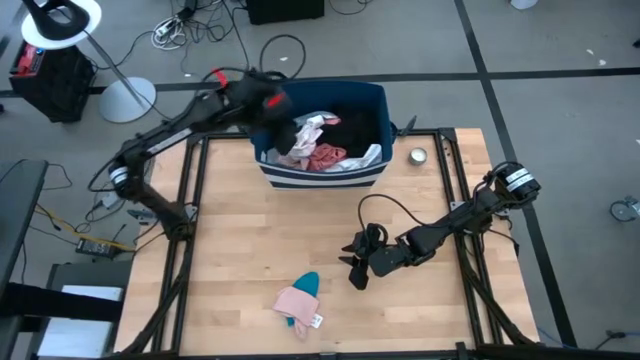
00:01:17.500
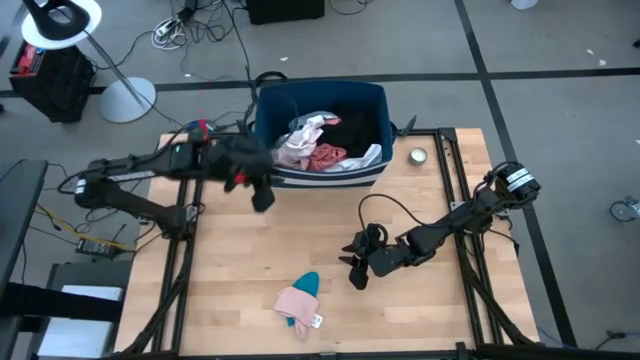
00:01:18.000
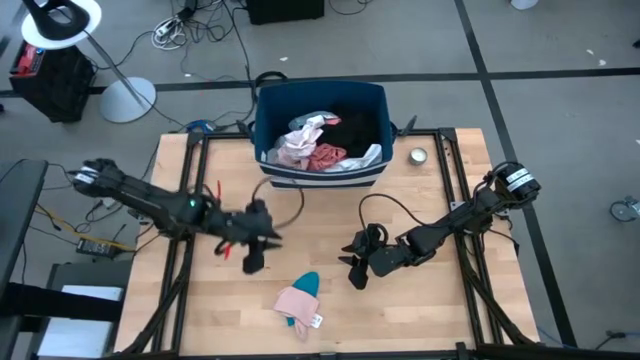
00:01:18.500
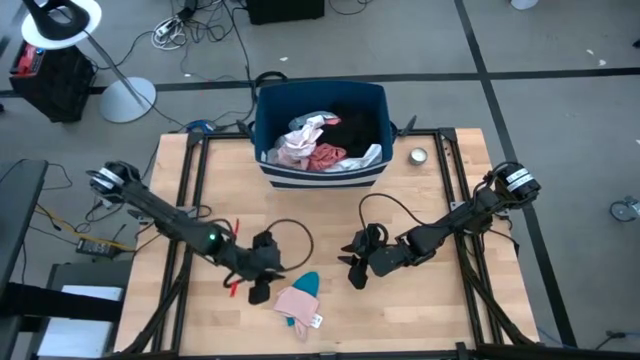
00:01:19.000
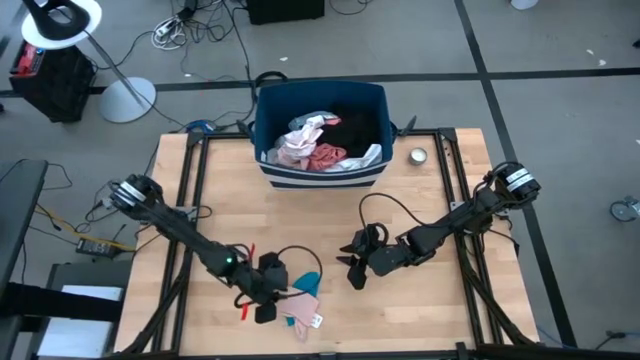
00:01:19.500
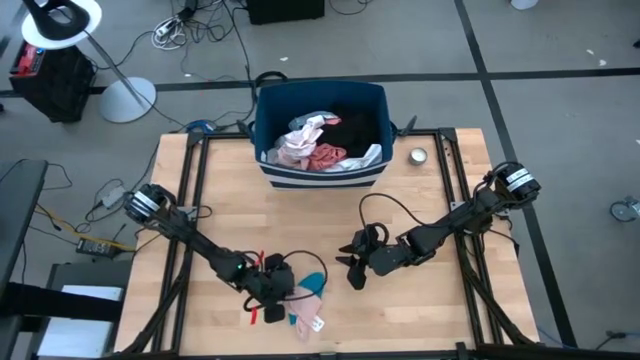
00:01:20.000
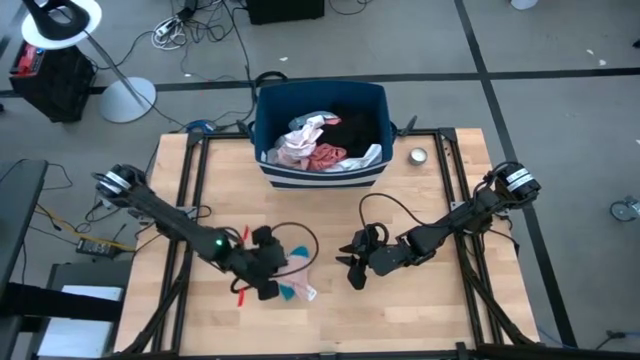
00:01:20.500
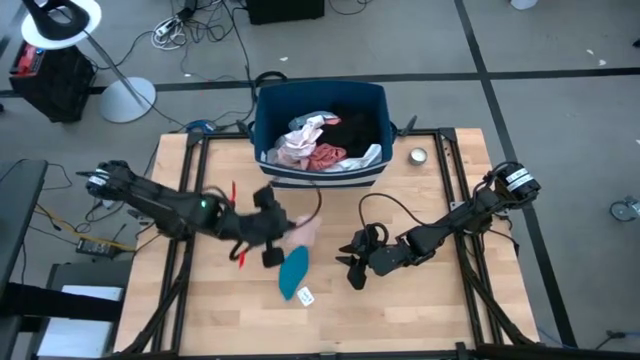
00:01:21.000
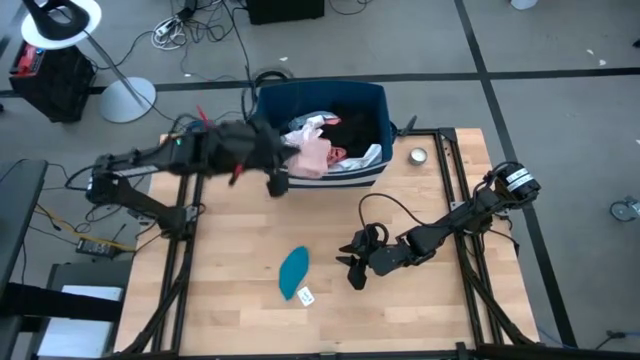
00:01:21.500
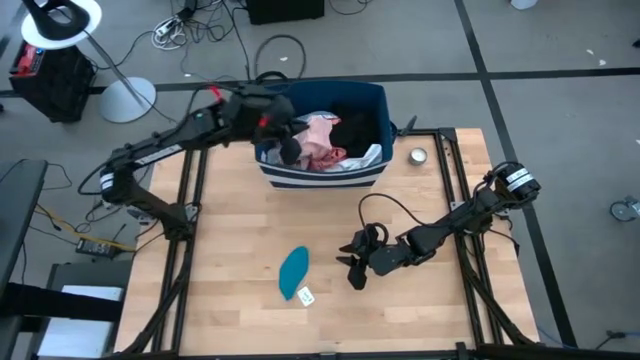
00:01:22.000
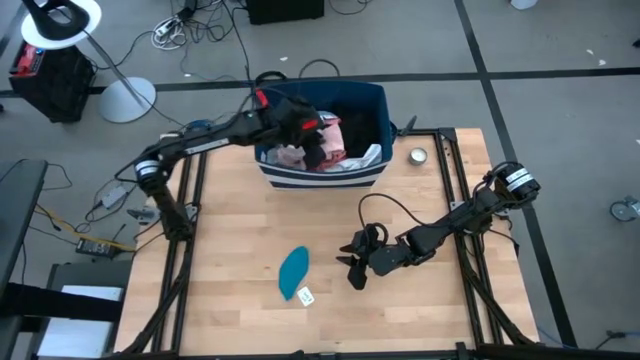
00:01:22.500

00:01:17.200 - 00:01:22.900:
Task: Sort clothes
Put the pink sock into the blue laundry bin

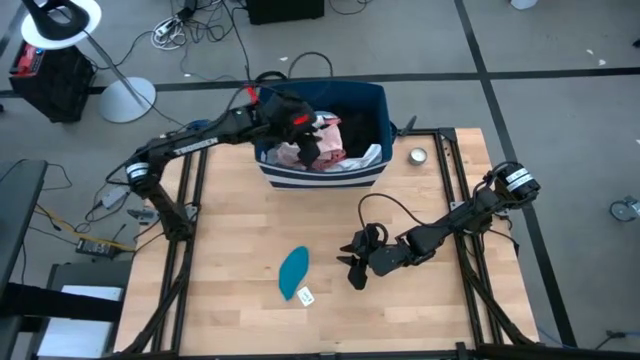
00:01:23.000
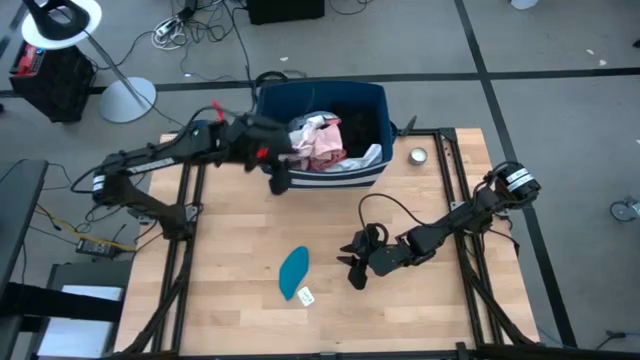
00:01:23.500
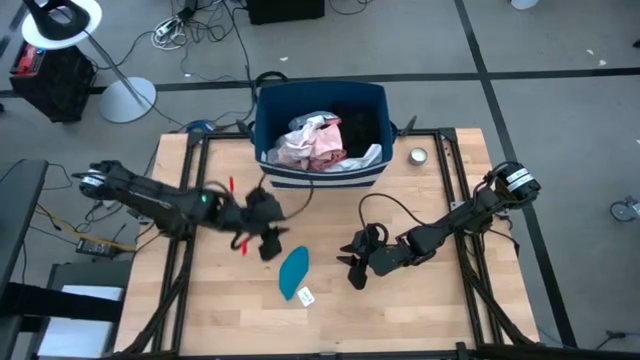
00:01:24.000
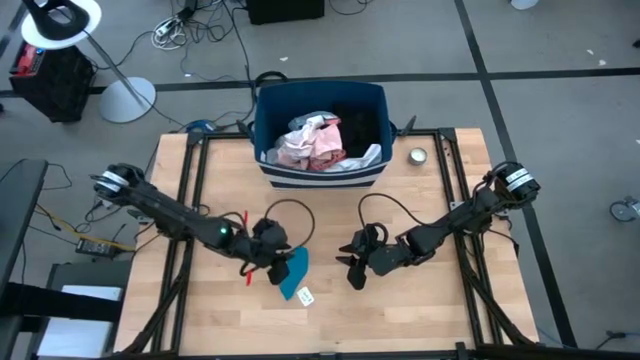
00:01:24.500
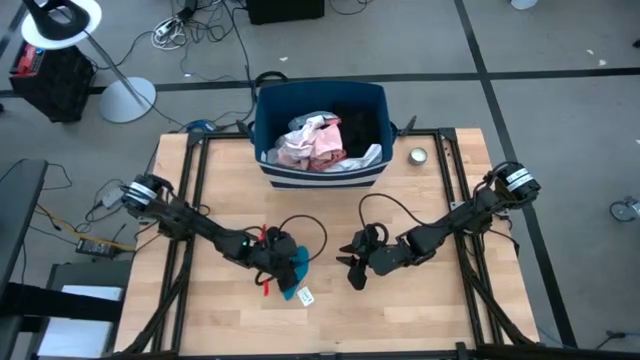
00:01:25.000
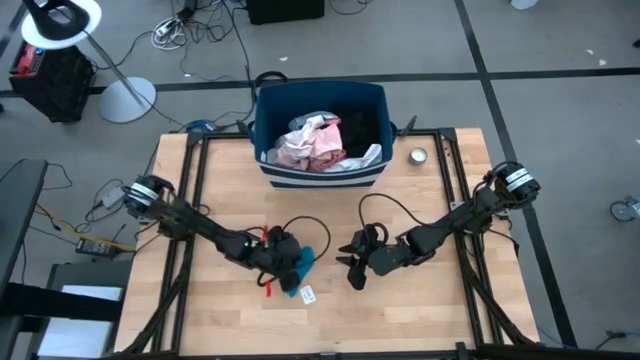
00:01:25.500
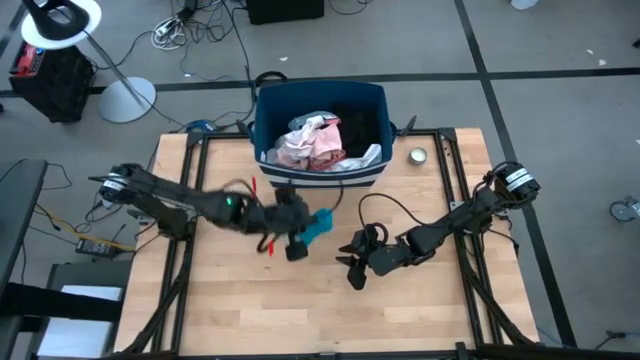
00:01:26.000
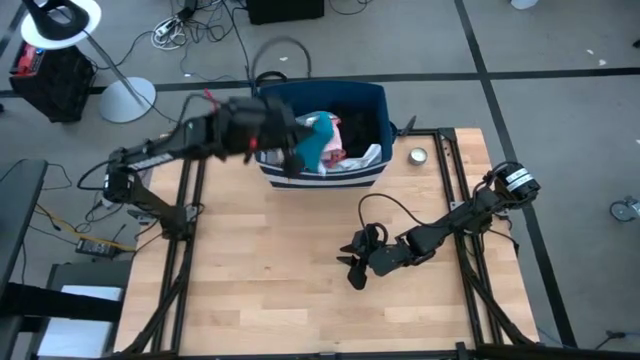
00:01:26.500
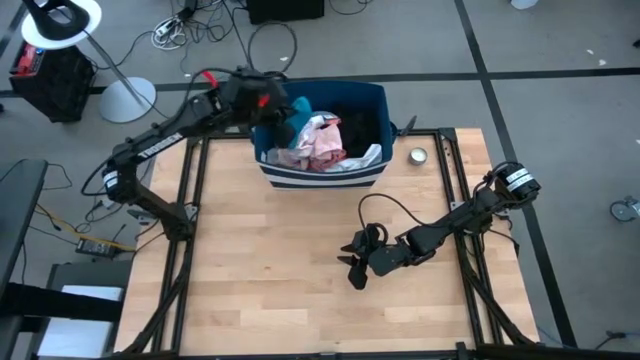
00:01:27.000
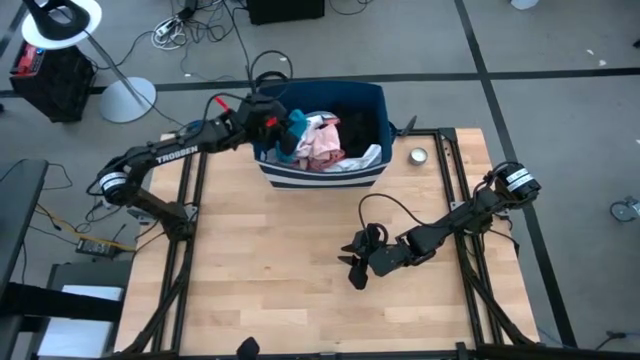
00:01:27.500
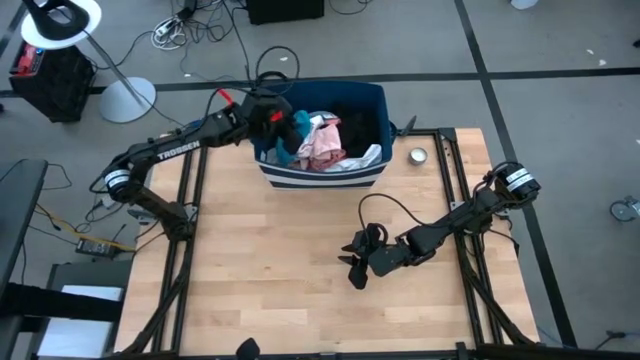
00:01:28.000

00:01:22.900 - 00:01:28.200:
Put the blue sock into the blue laundry bin

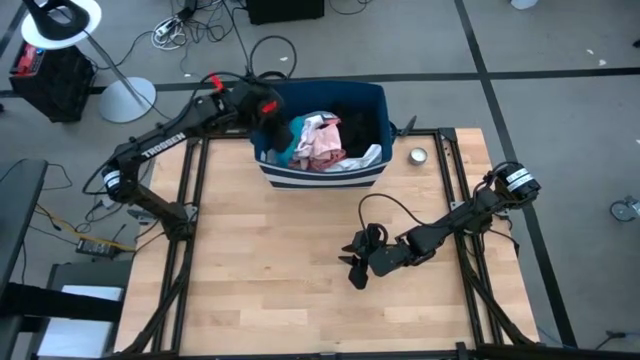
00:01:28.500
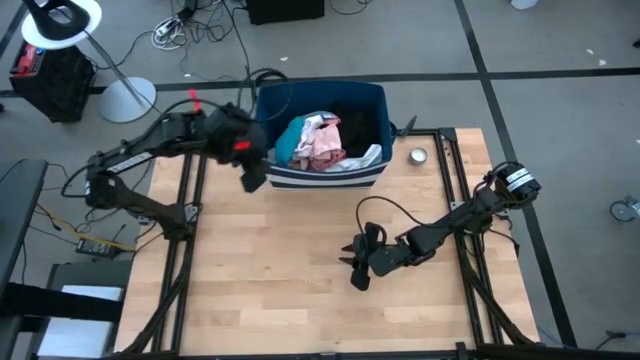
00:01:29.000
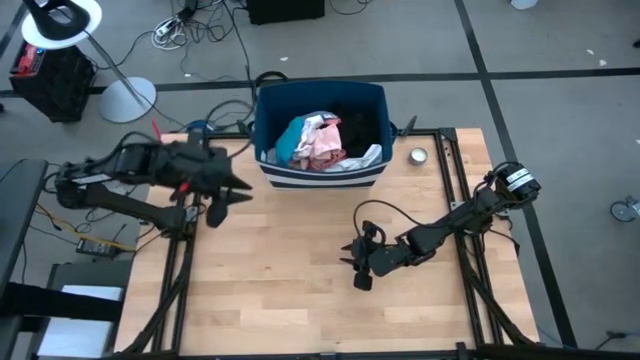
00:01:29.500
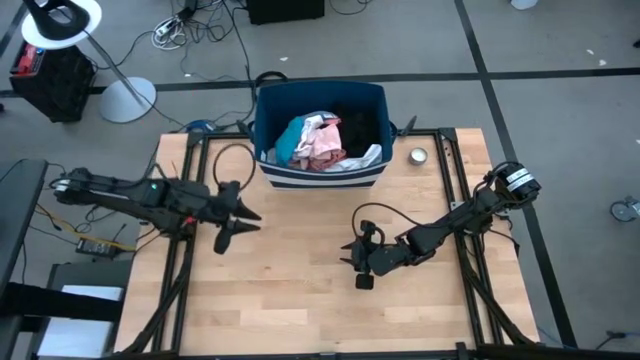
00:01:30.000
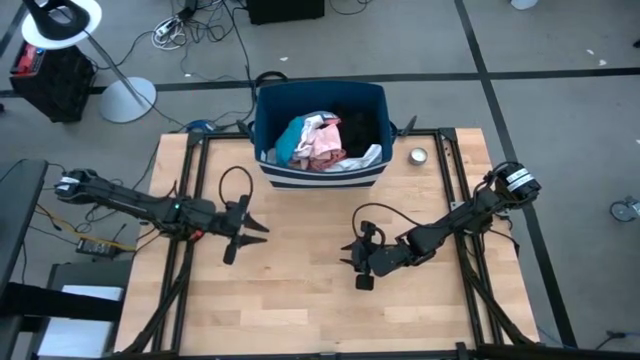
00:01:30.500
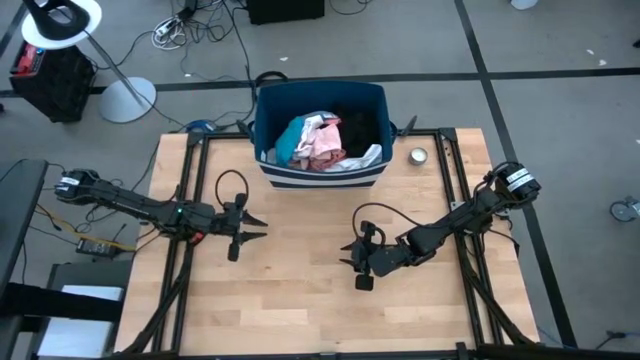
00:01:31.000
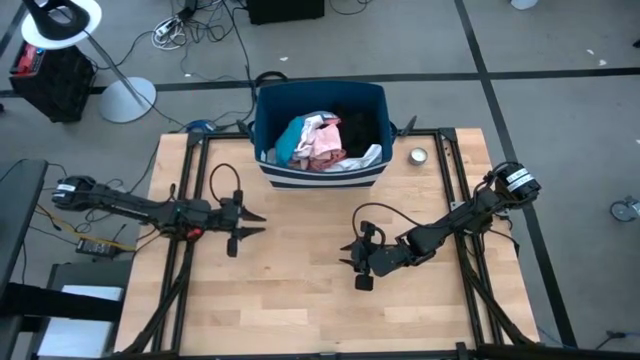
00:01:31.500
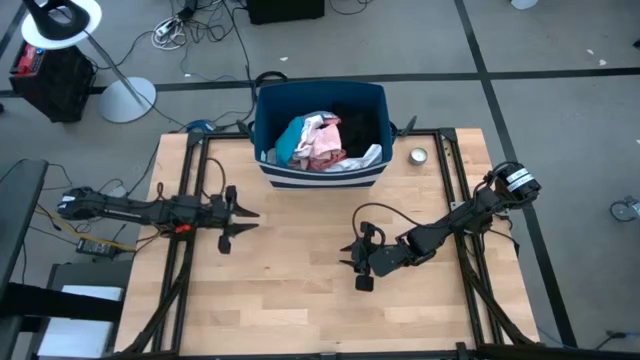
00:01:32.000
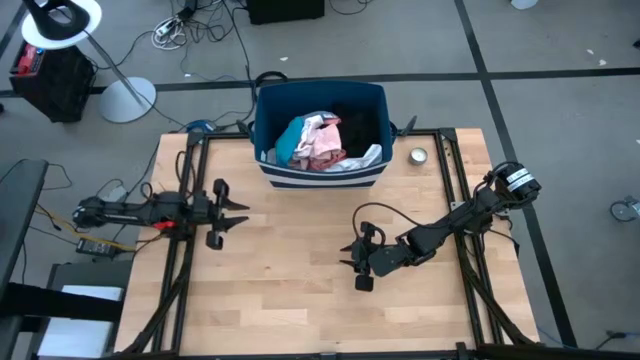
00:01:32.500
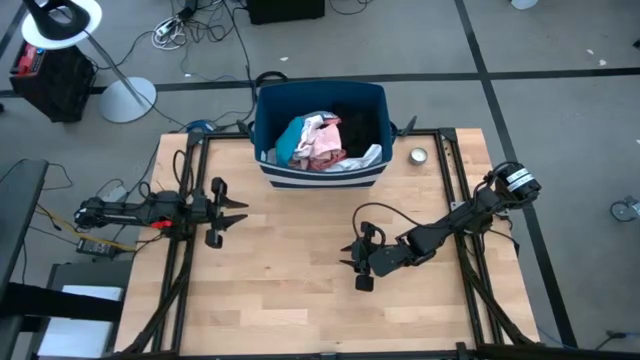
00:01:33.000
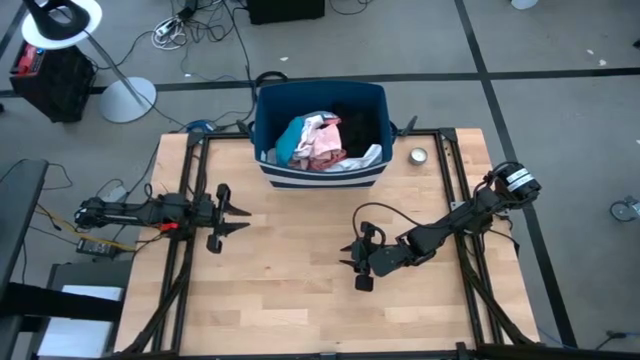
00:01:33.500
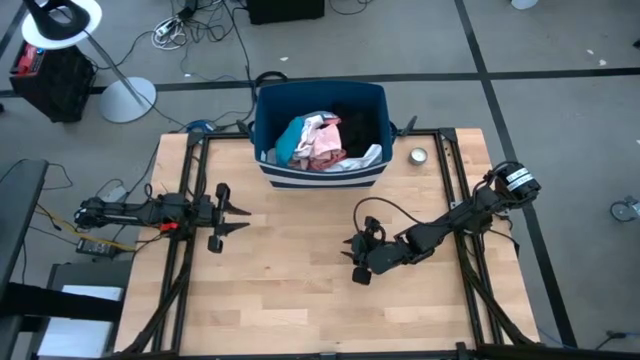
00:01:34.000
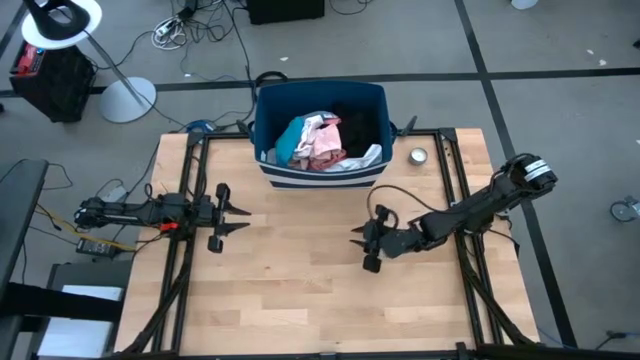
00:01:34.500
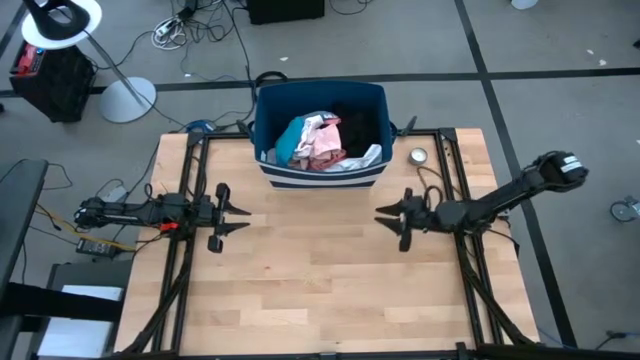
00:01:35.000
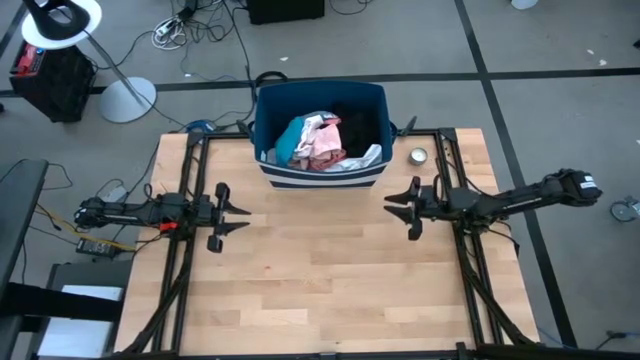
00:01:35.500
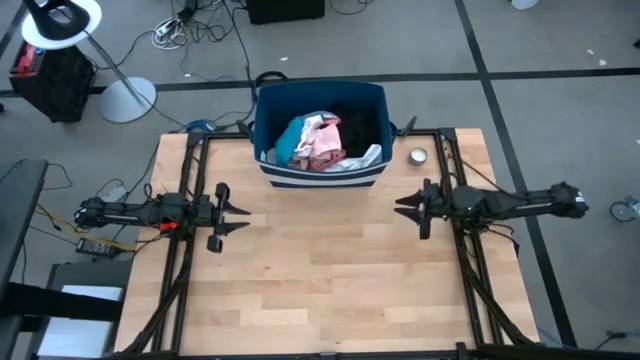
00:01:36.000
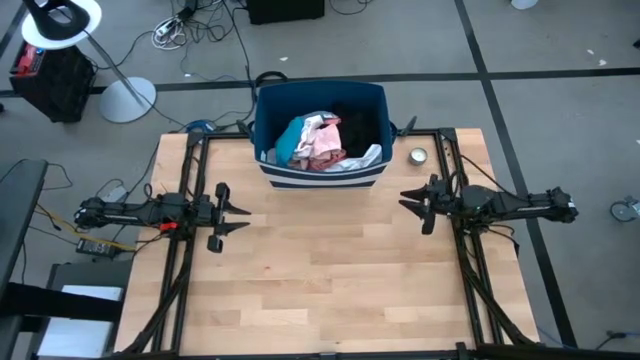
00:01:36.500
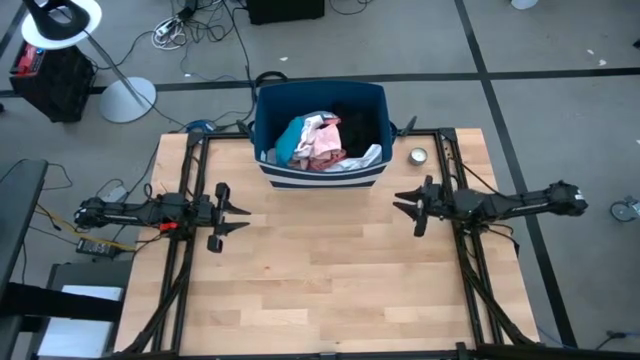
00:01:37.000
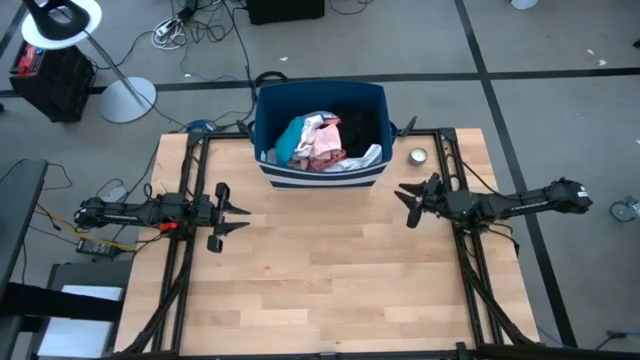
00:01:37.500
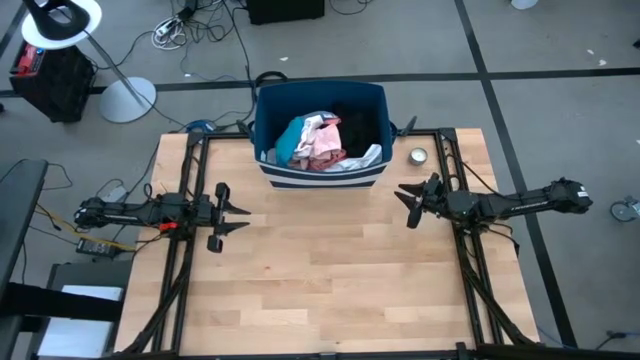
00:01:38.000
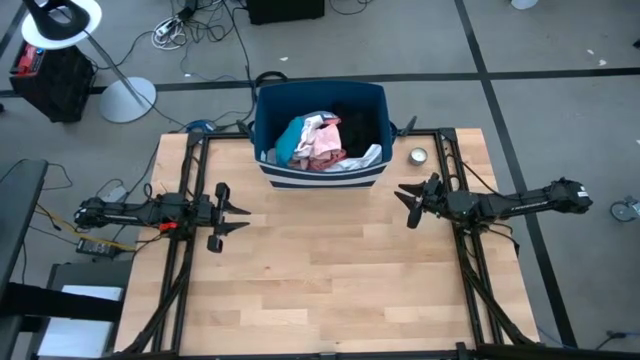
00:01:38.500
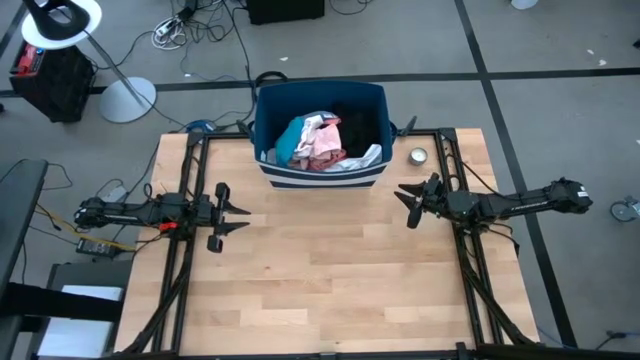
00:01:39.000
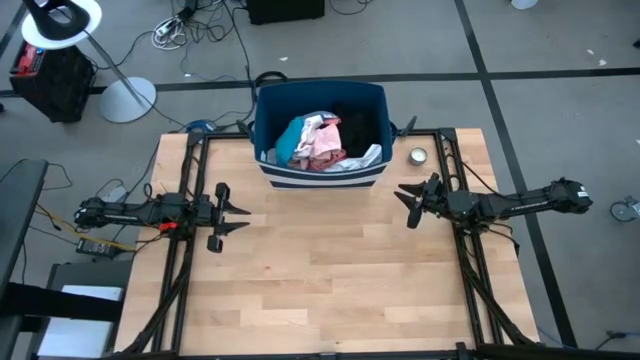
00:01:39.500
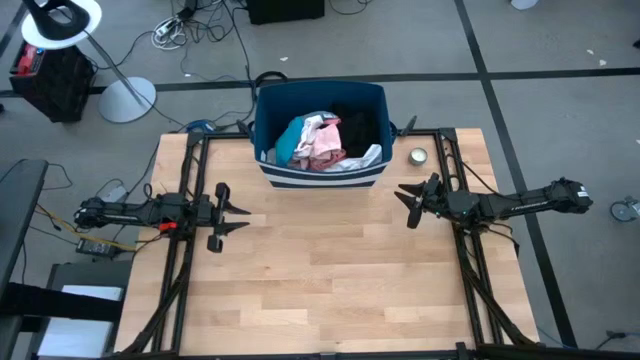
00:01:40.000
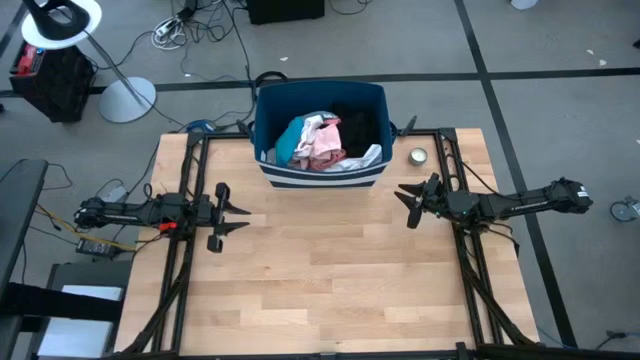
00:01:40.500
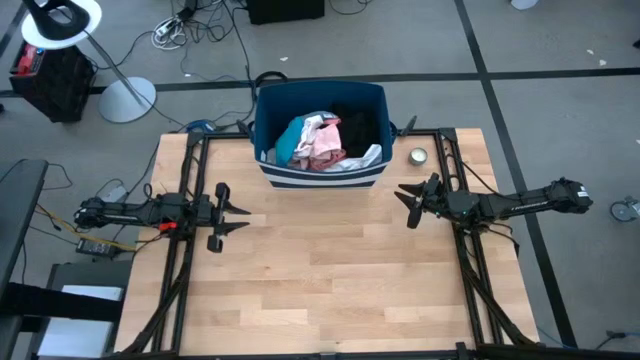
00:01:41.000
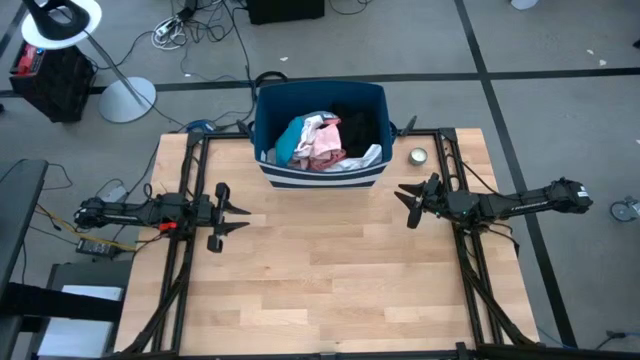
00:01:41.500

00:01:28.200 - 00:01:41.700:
Return to Home Position
